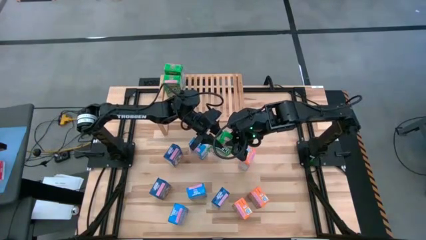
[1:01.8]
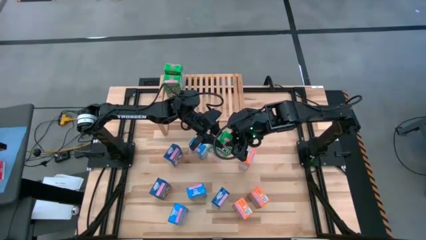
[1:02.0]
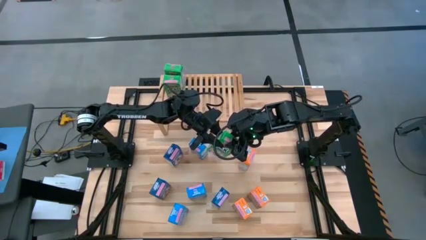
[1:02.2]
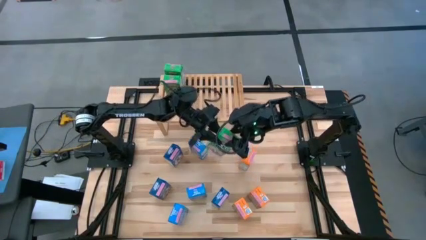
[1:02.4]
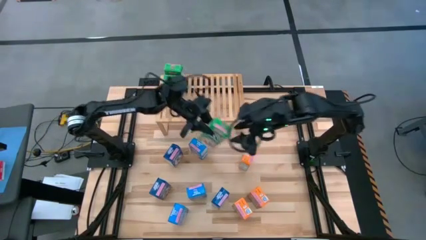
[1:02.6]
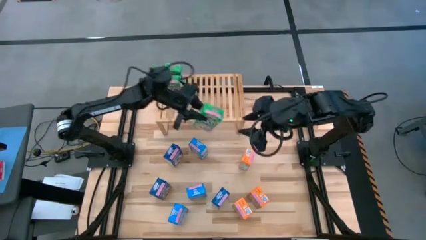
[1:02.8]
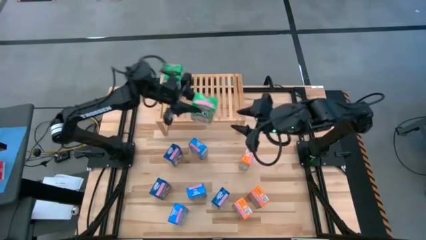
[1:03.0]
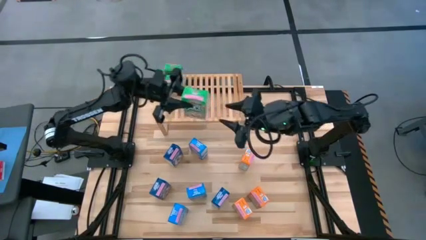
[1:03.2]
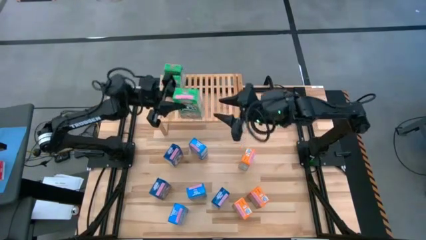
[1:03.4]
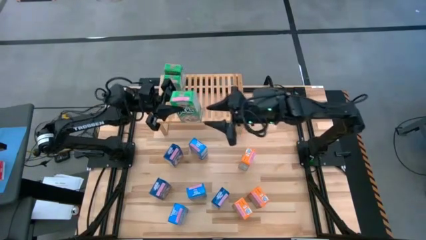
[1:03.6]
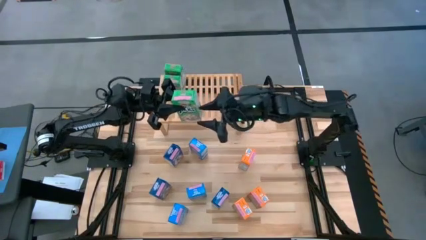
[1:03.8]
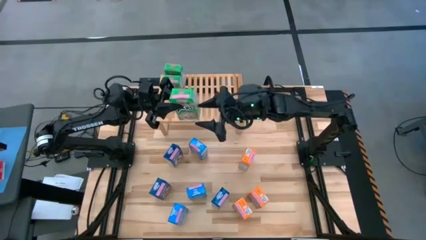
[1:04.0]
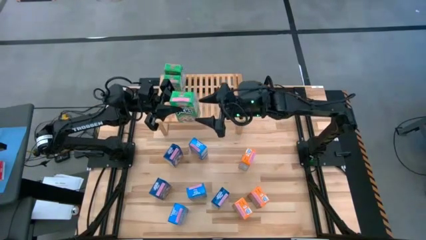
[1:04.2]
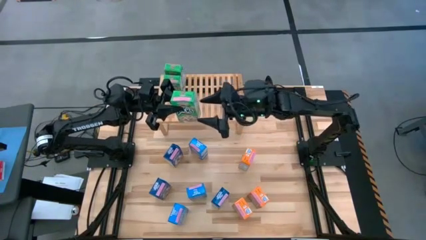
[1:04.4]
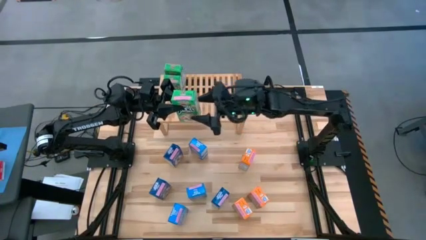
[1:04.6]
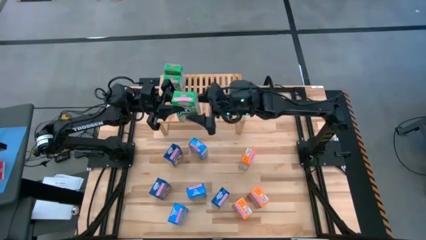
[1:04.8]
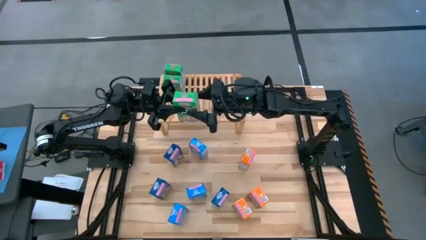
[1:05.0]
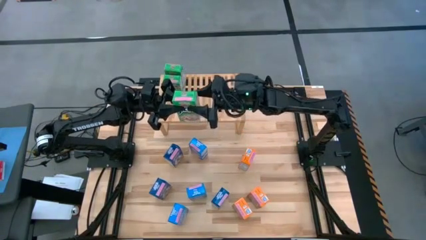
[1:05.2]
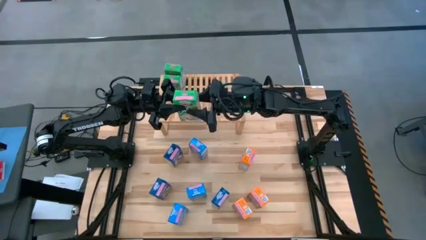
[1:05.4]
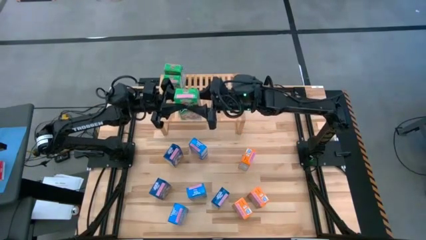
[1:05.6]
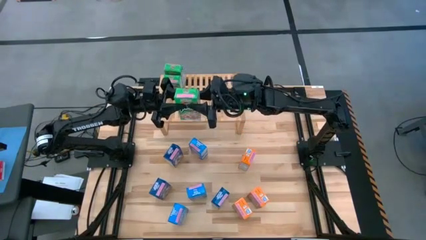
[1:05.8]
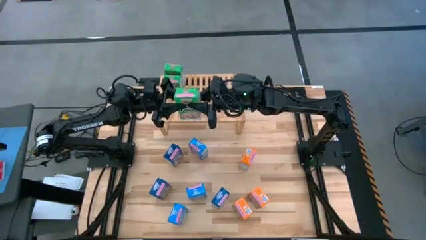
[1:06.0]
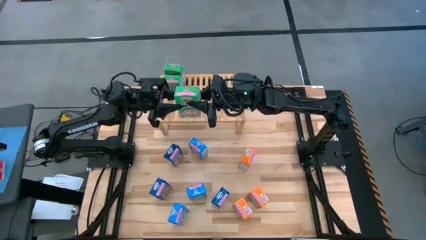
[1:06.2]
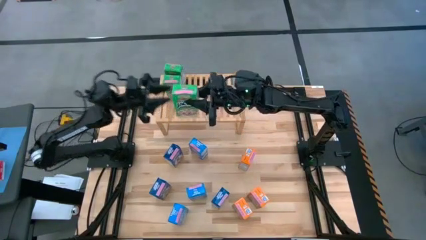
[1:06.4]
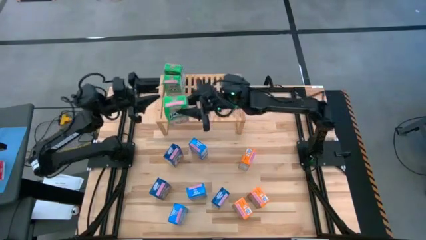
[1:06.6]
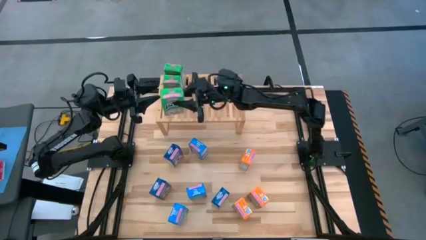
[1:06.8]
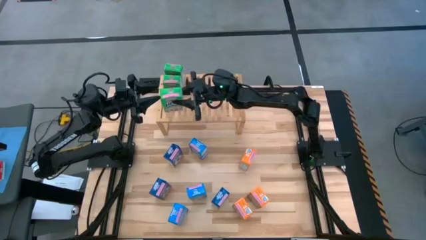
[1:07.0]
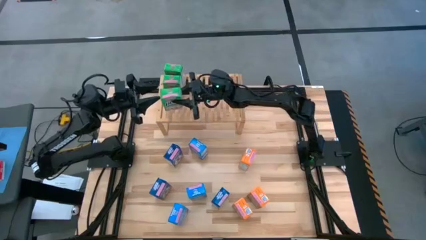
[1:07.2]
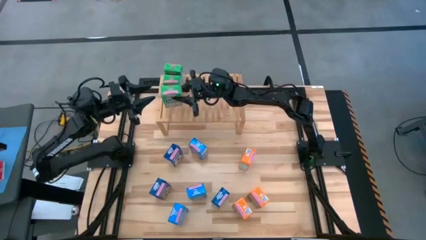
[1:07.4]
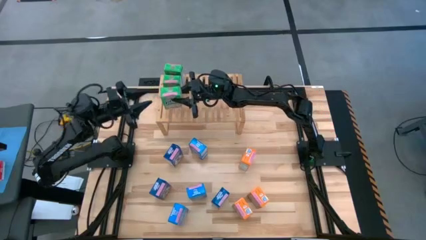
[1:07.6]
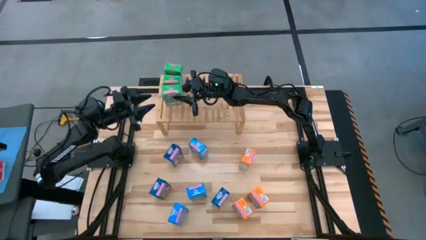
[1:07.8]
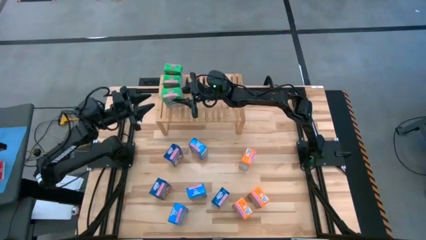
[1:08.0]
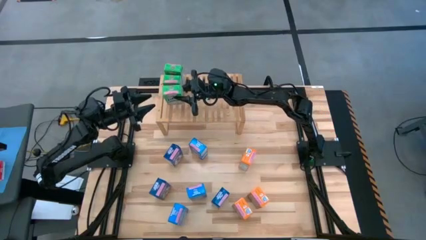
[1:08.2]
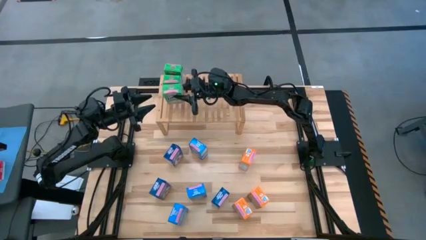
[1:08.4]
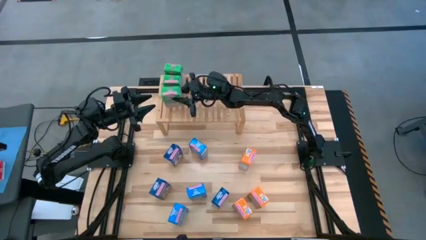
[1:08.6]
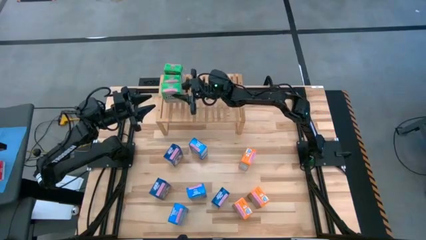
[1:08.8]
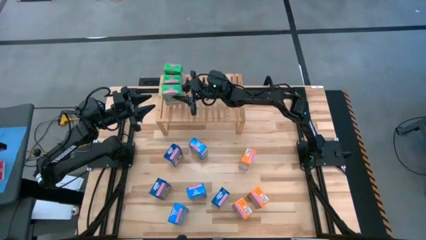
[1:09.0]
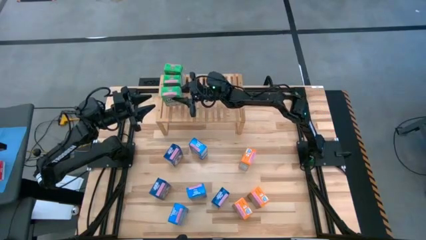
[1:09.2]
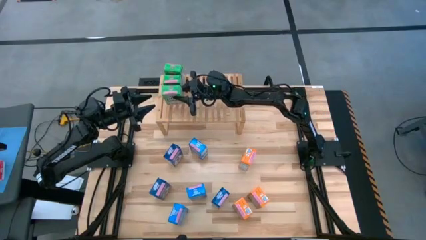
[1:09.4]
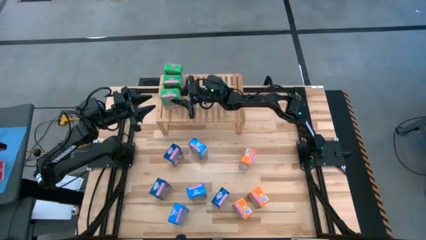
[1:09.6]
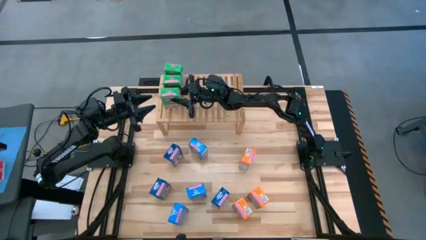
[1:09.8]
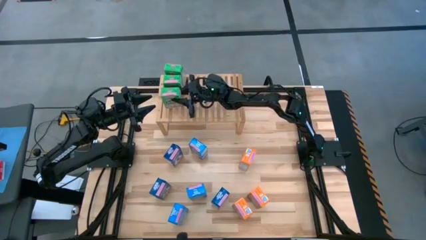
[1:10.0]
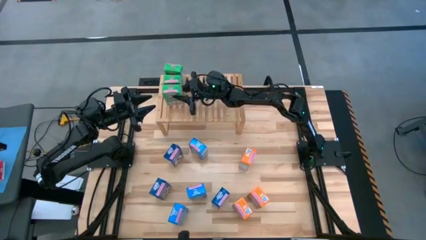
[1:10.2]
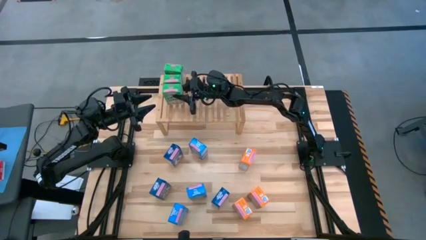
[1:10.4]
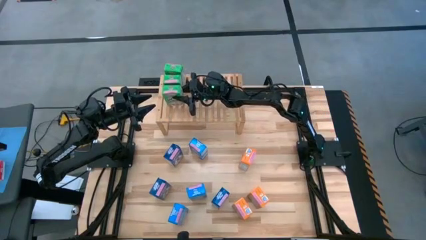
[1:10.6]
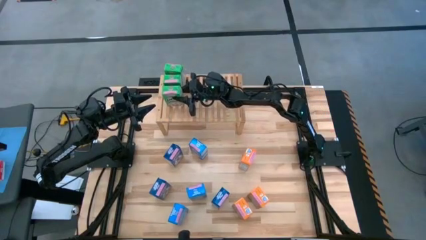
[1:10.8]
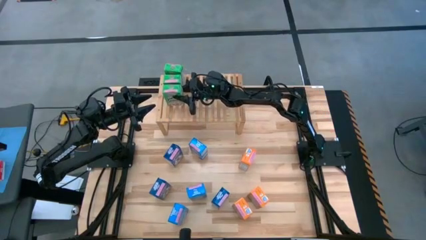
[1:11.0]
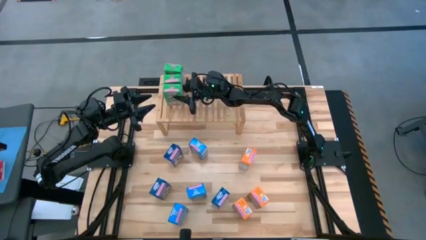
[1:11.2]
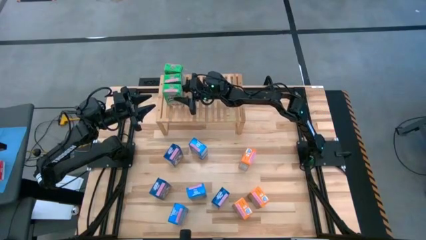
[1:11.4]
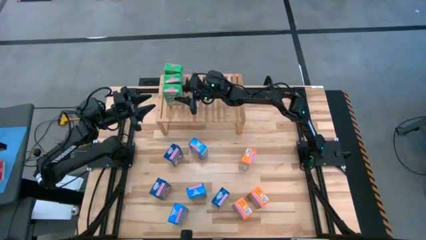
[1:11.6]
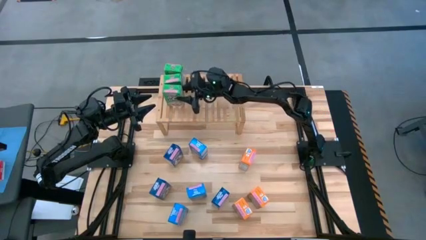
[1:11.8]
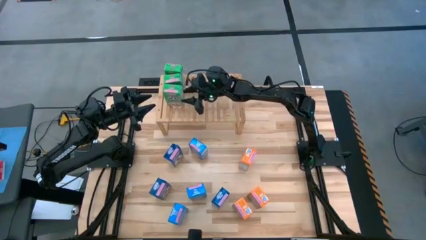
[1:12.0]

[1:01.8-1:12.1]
Task: Stack cereal on shelf
Put the green cereal box on the shelf aligned with other green cereal boxes
